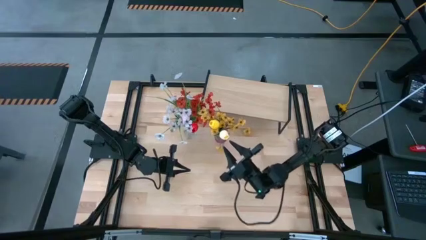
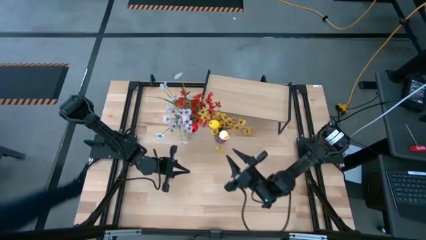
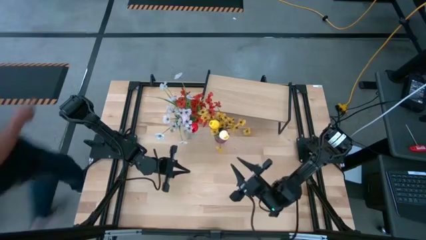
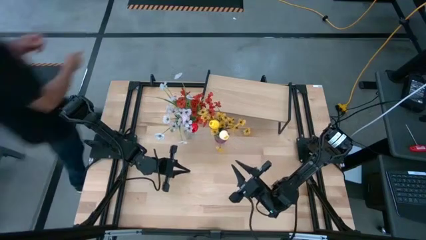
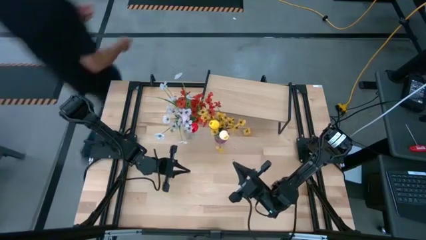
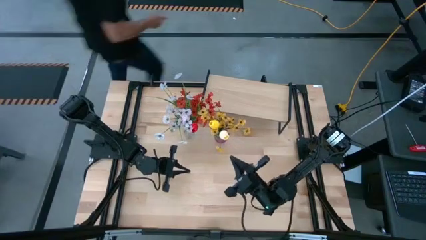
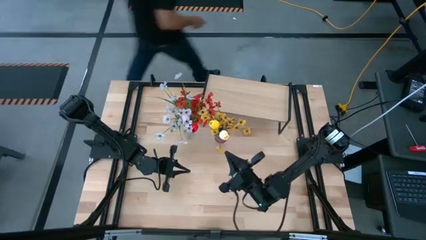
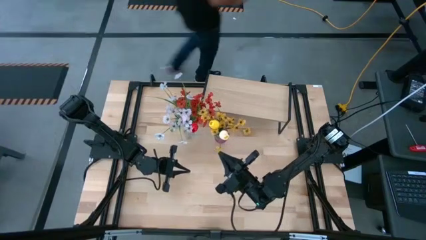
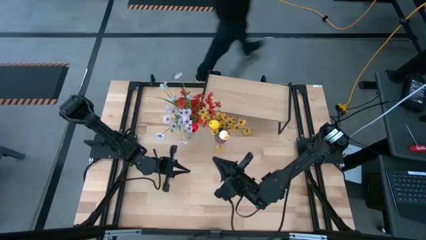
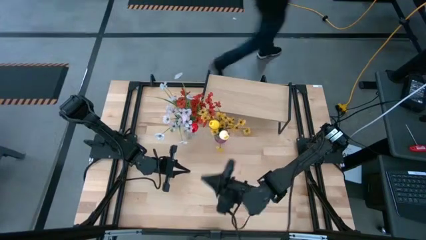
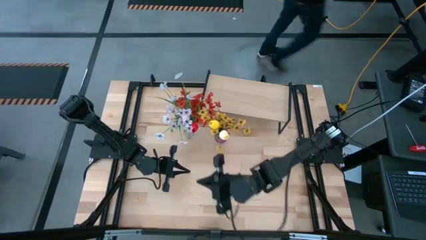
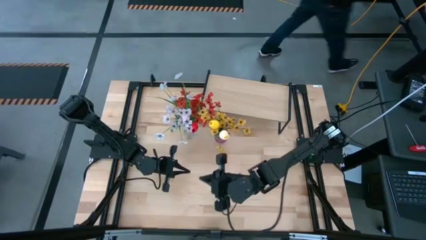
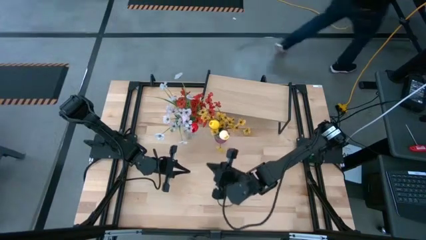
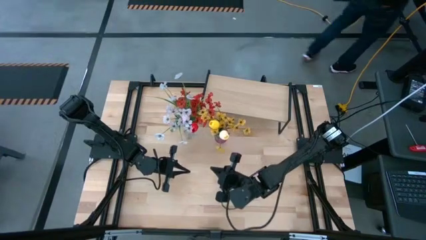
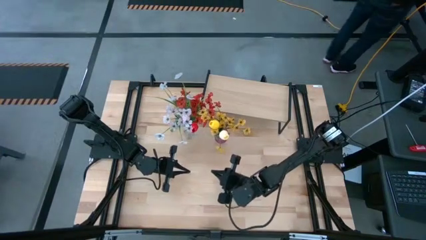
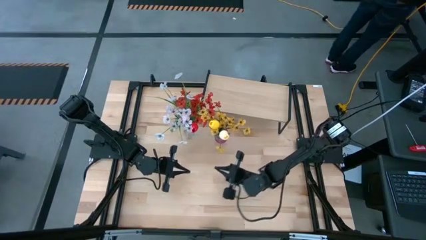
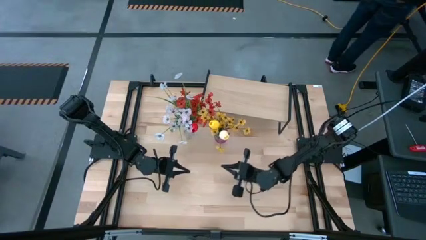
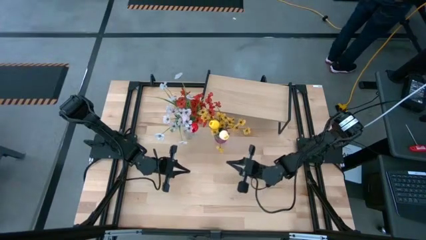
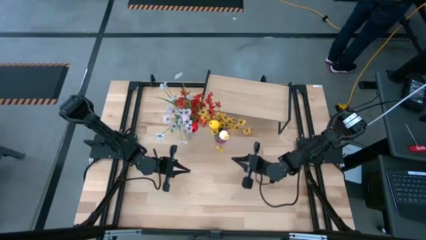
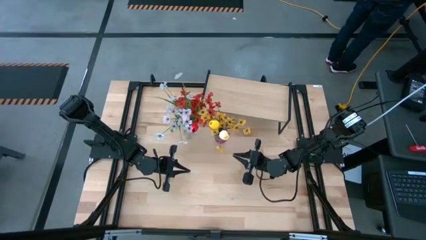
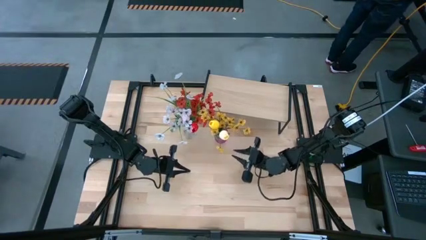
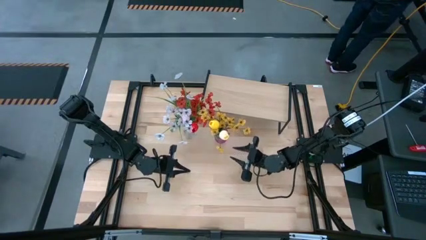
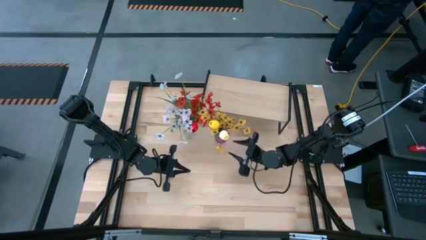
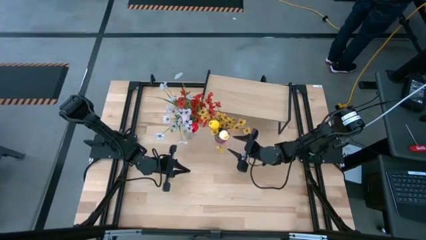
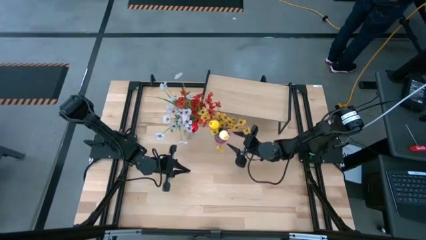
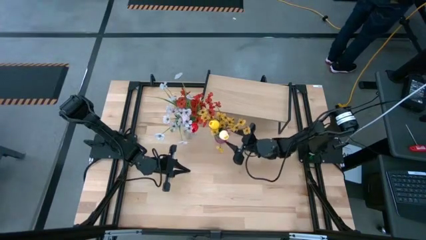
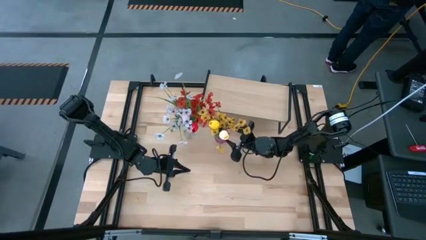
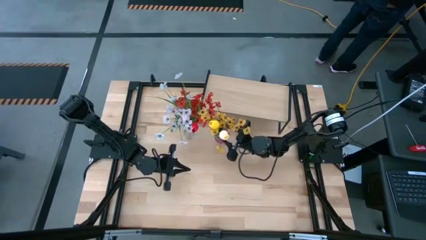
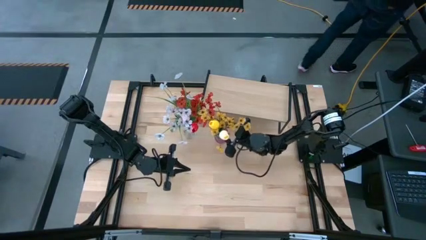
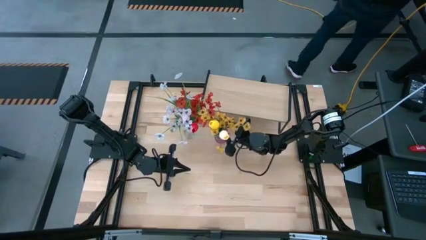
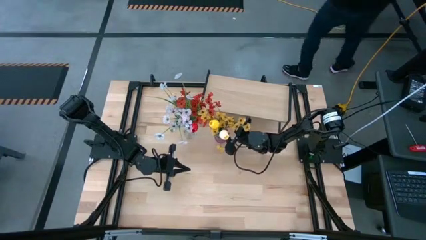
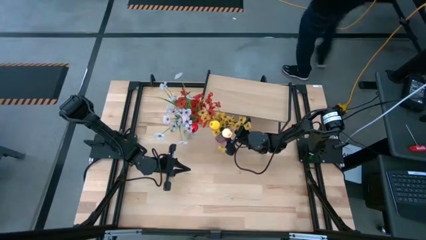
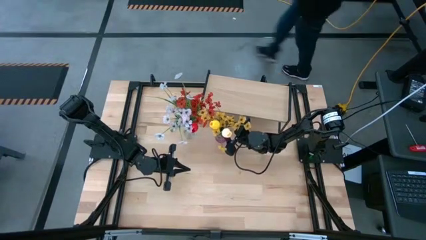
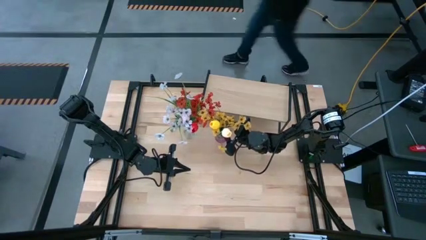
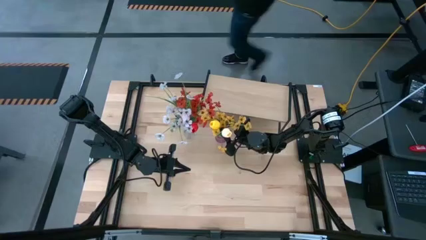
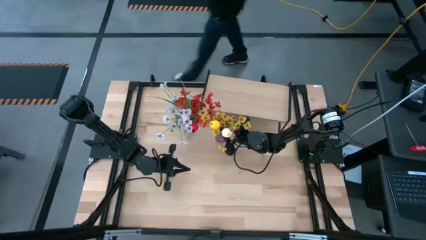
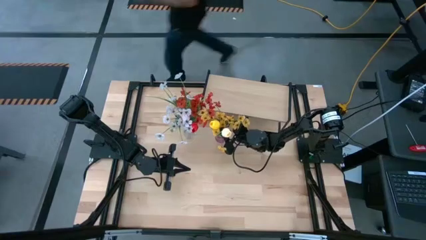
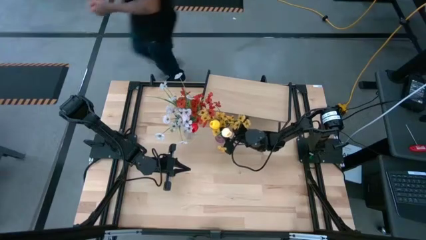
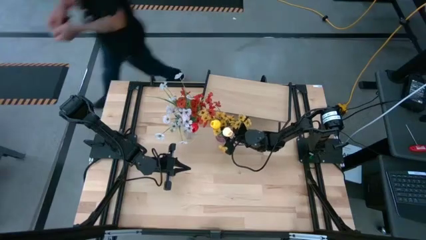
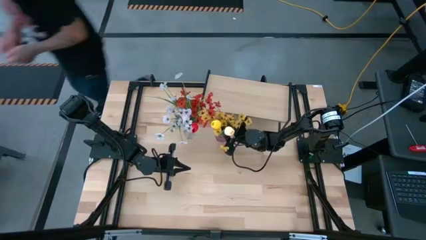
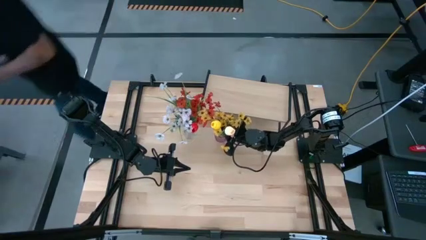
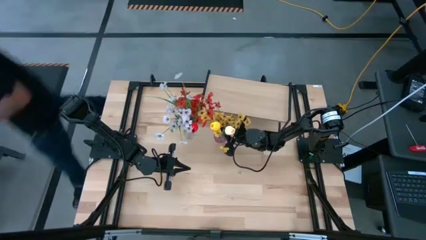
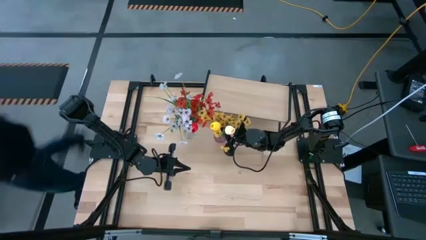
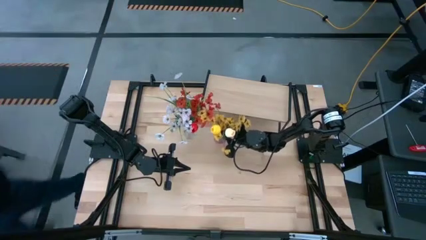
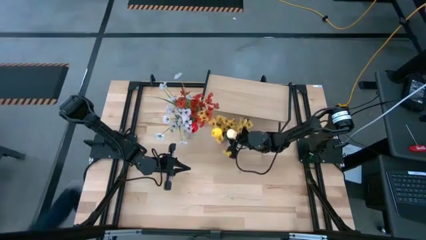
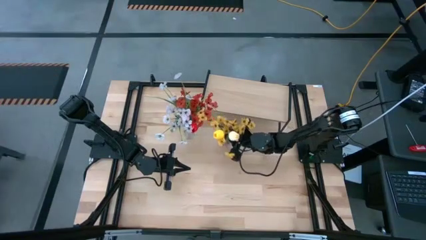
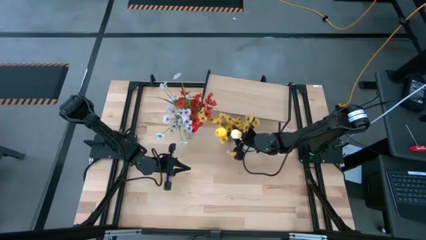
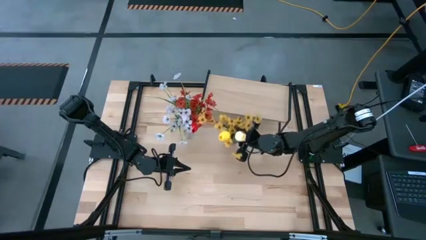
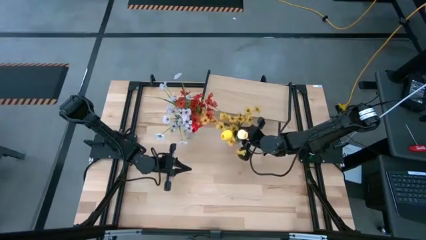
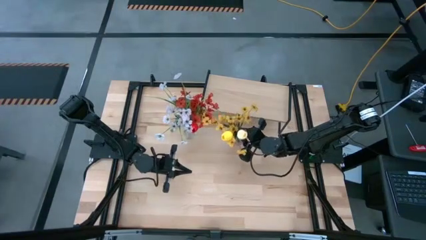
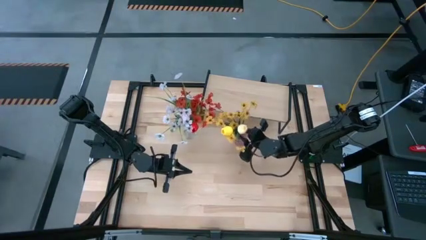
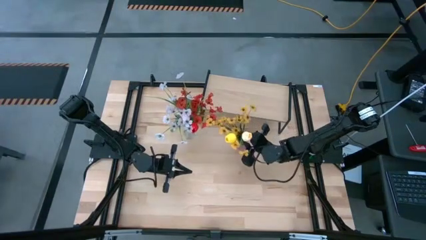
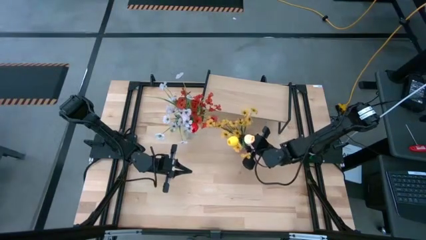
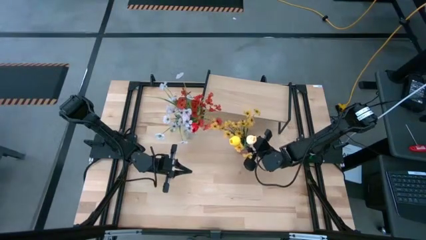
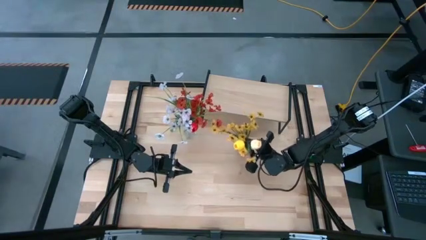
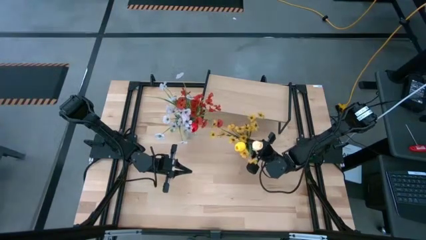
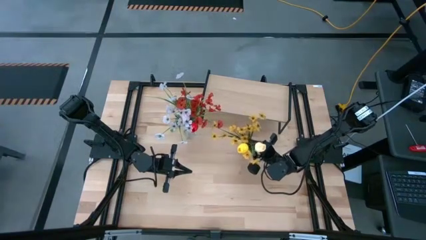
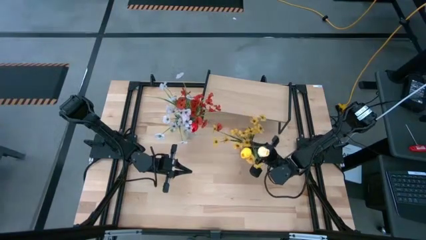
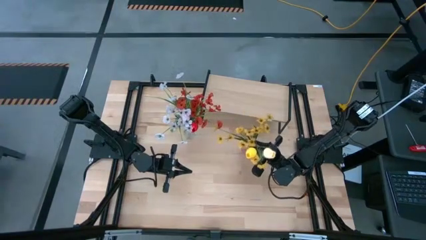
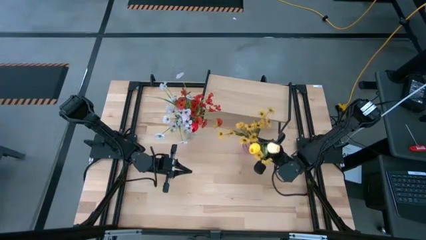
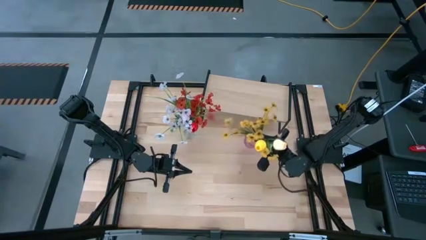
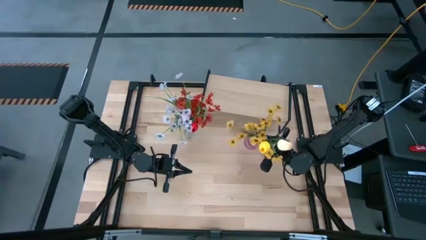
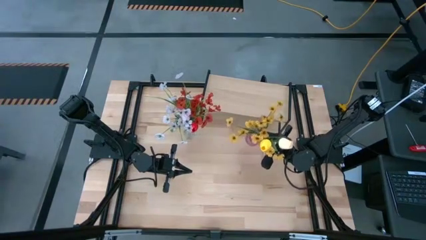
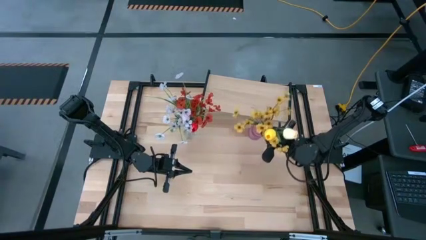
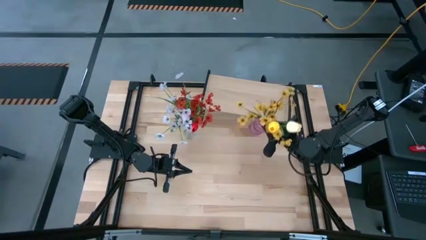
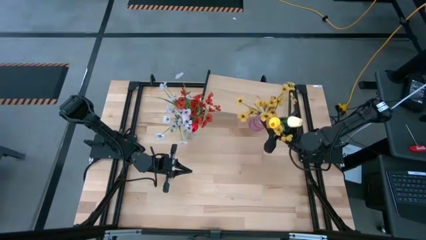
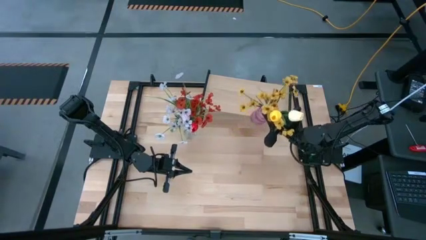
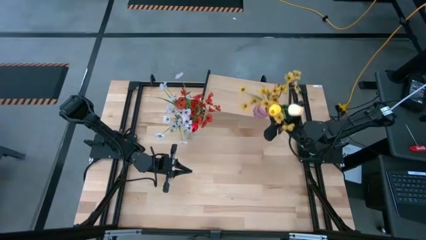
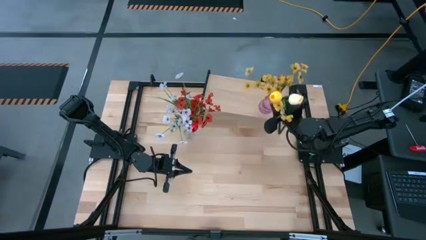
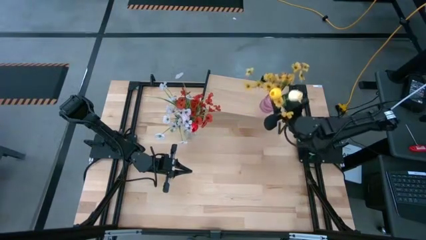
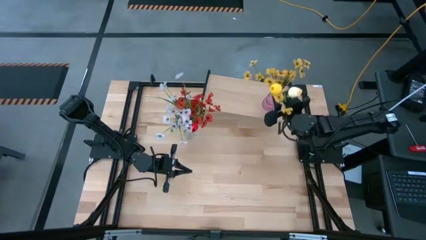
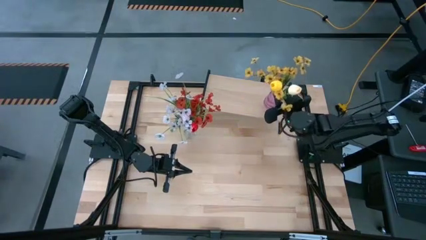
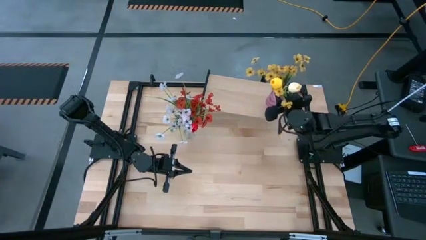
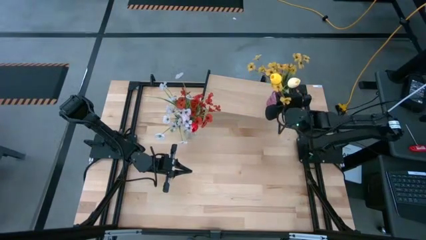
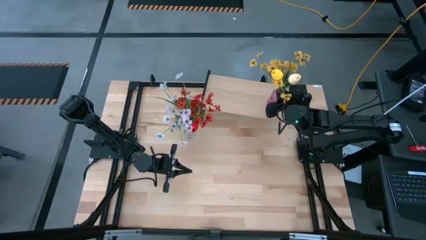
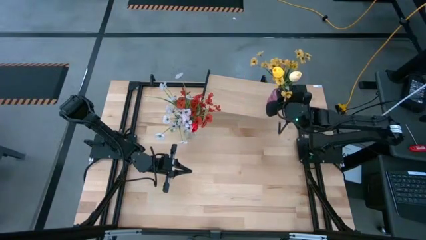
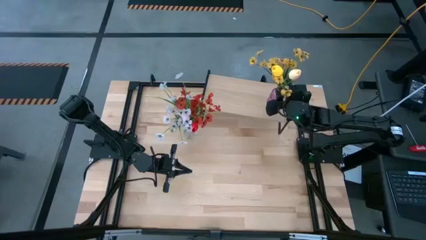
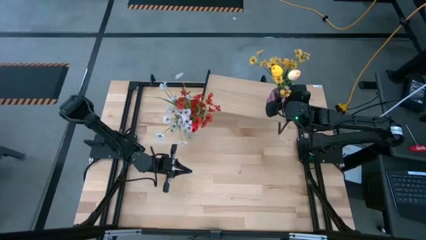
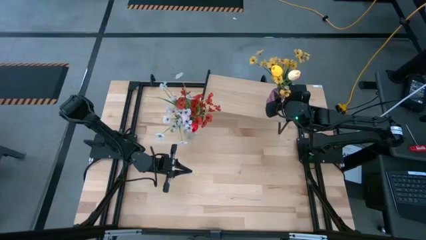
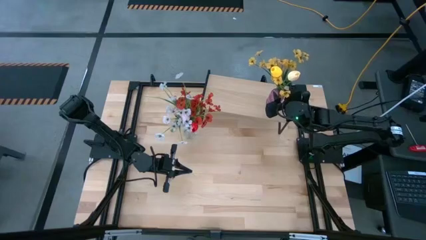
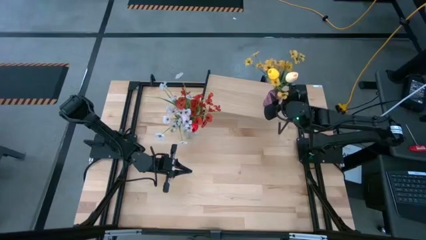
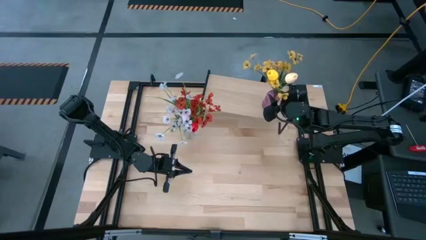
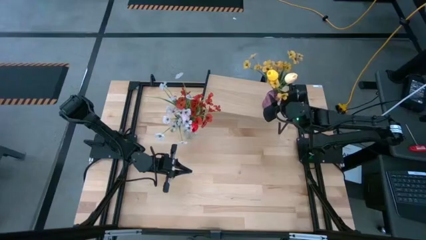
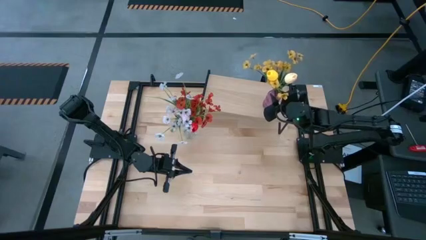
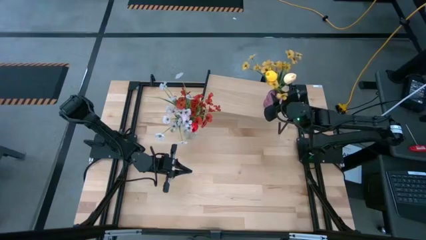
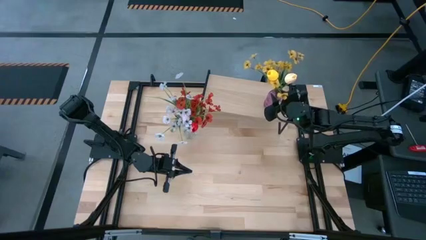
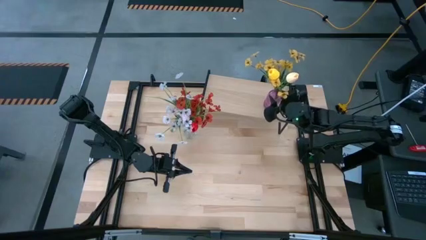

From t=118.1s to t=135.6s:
Task: Pick and place flowers into a vace then onto a shelf
Put the violet vase on the shelf
